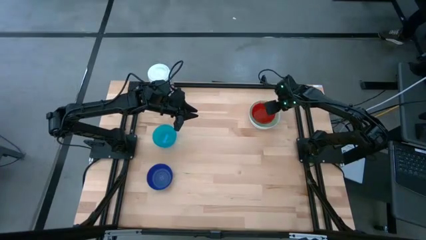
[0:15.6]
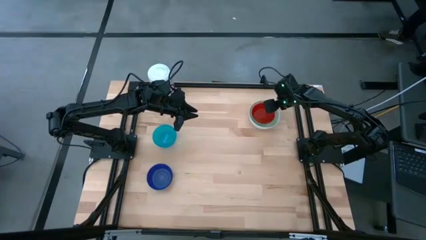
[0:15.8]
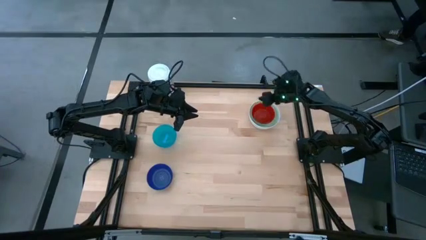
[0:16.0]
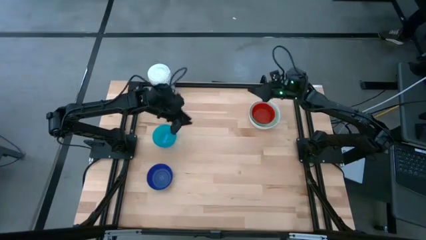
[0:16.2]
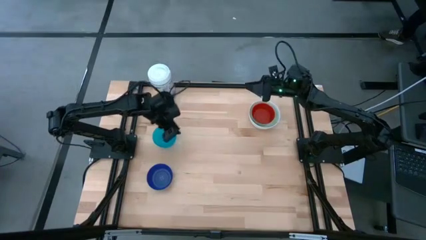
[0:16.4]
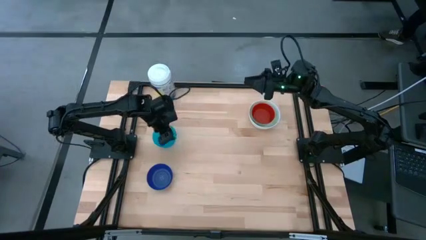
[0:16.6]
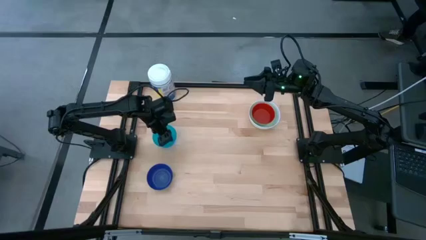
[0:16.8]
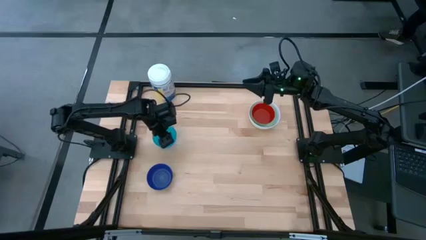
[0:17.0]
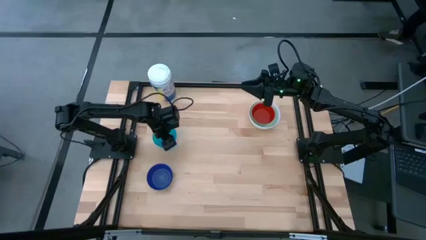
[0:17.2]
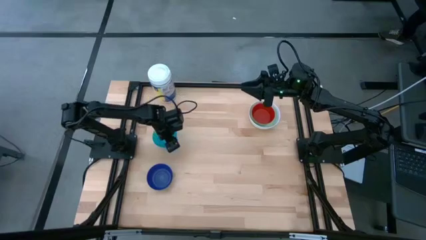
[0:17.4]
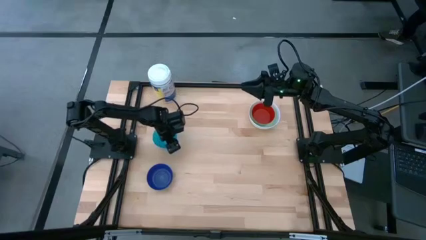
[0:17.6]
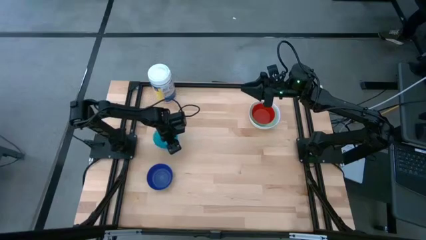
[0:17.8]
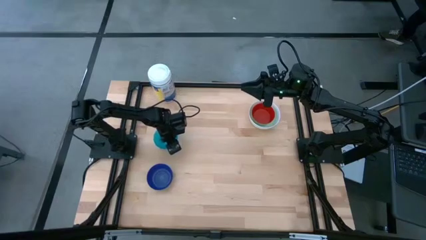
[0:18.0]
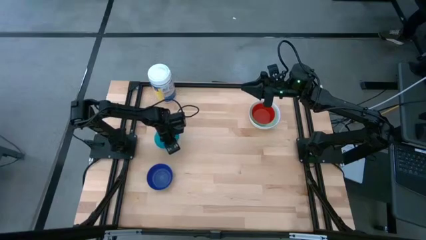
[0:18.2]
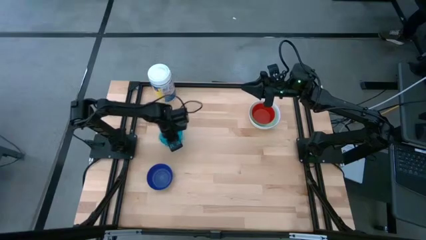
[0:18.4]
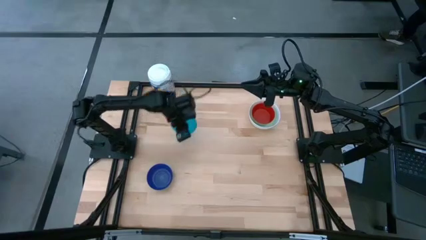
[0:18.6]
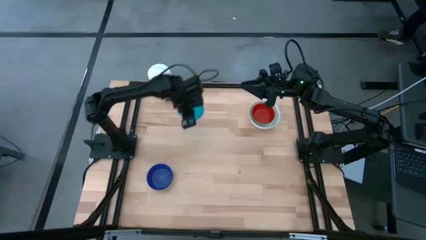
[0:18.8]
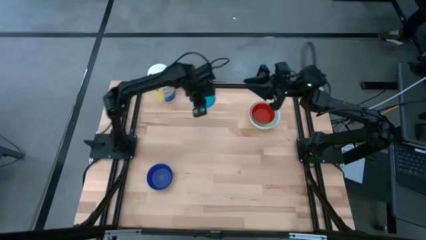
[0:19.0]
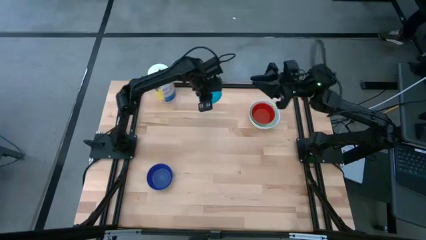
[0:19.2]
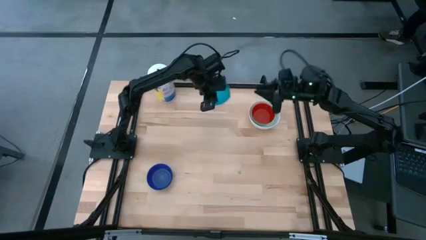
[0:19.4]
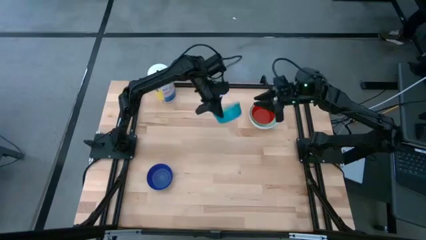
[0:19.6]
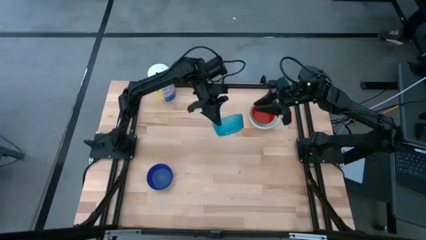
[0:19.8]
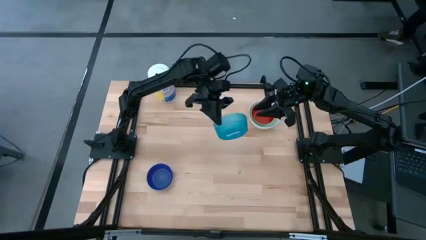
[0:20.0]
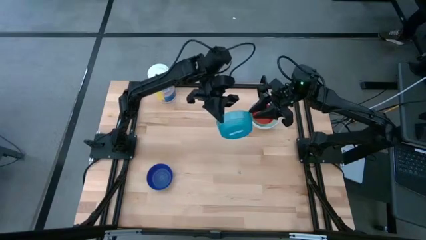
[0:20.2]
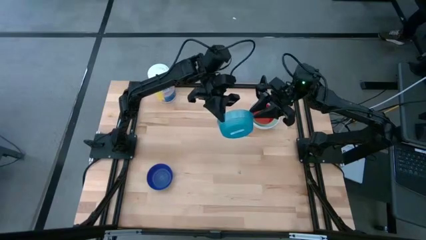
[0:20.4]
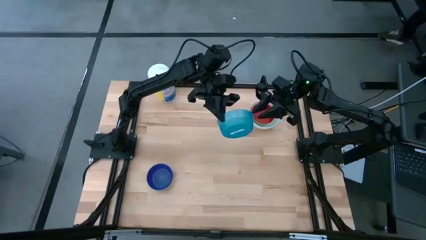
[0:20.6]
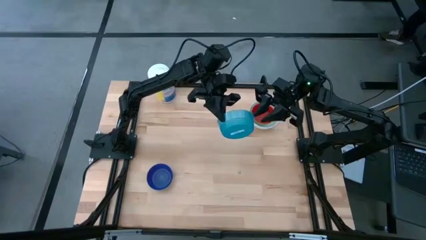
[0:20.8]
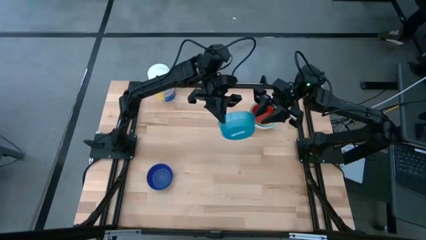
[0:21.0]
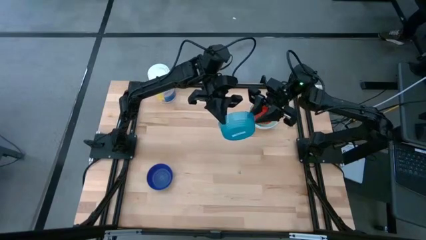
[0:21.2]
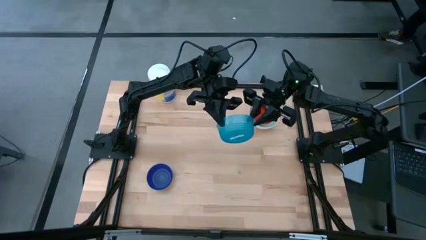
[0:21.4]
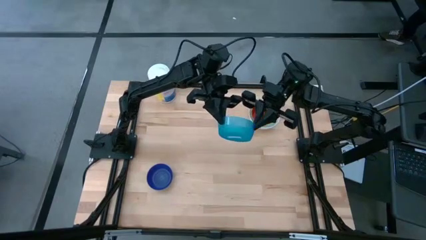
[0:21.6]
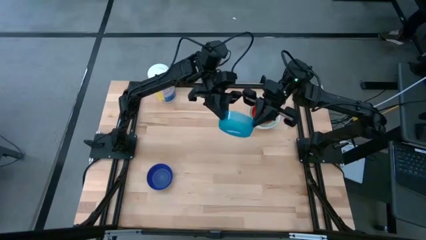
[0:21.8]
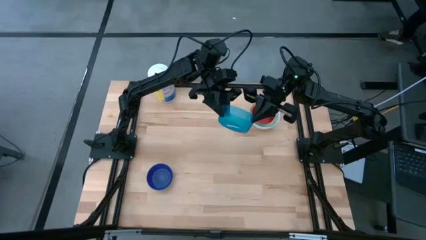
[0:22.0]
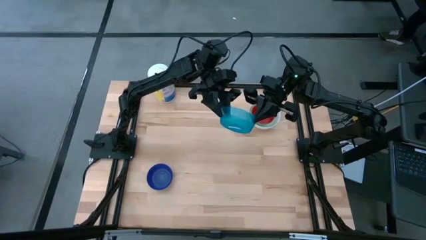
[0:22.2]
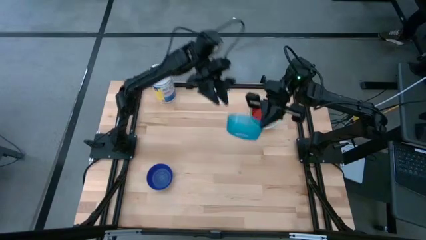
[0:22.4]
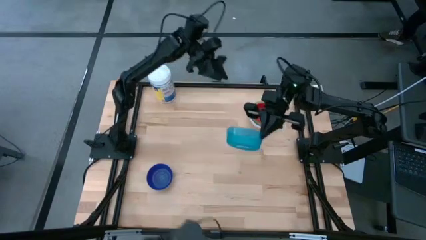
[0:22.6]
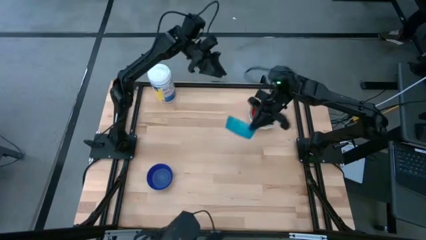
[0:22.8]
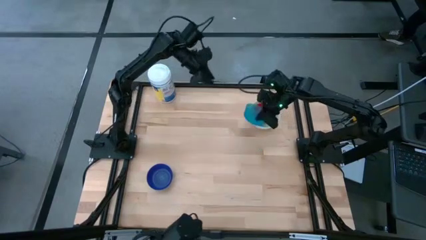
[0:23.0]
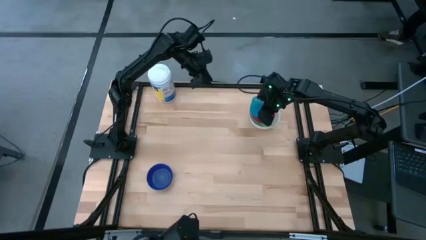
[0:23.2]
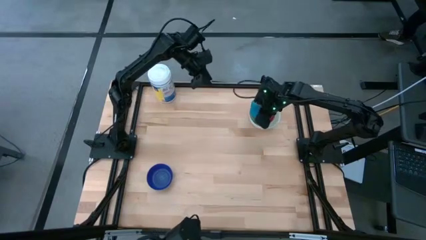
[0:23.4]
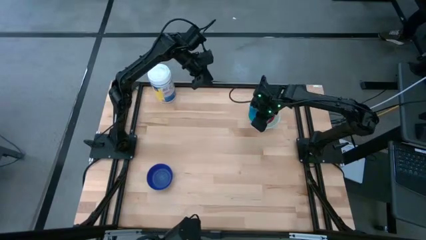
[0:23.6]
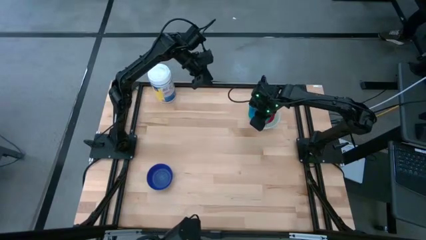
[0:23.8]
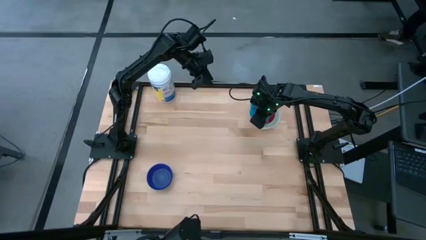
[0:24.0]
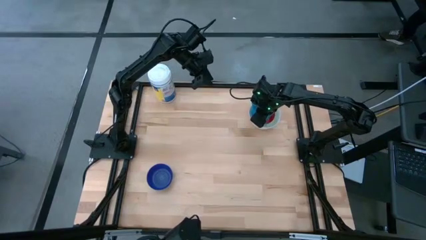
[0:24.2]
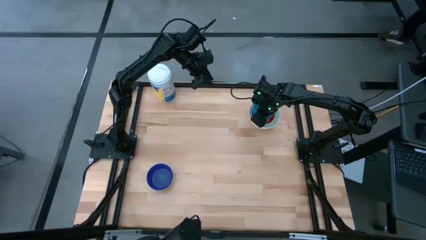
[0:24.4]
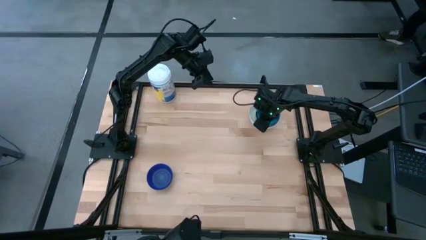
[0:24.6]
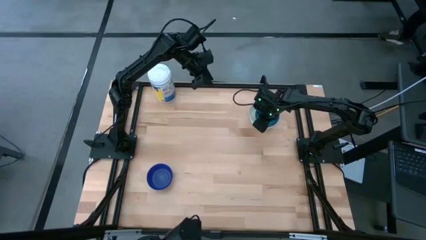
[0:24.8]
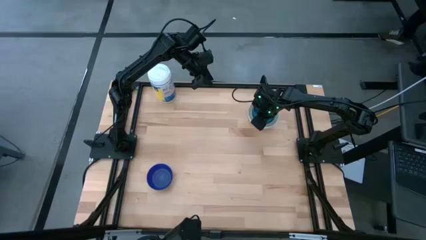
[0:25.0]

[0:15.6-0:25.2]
Stack the light blue bowl l on top of the red bowl

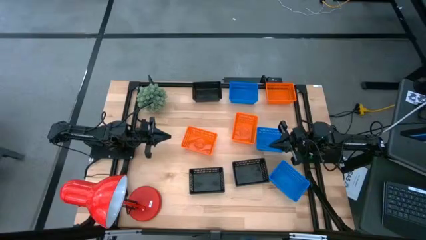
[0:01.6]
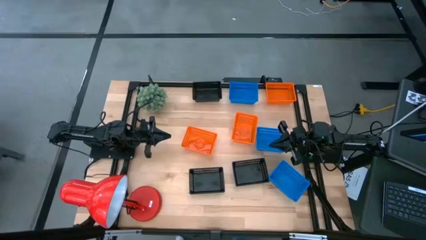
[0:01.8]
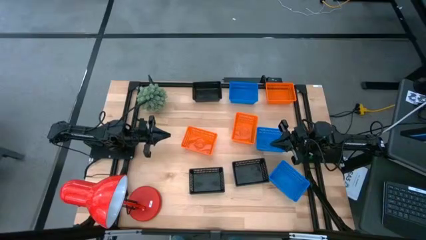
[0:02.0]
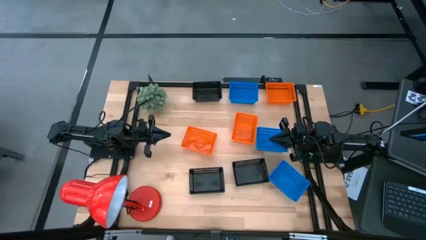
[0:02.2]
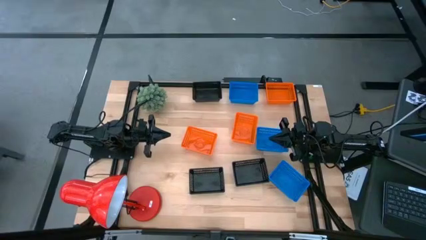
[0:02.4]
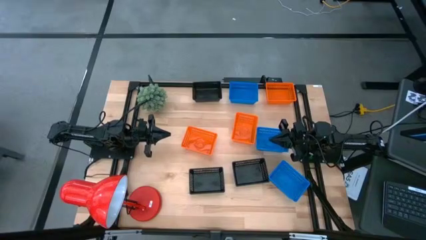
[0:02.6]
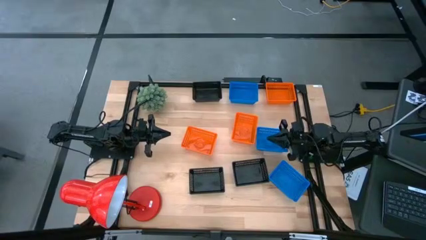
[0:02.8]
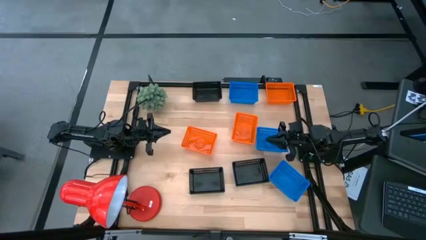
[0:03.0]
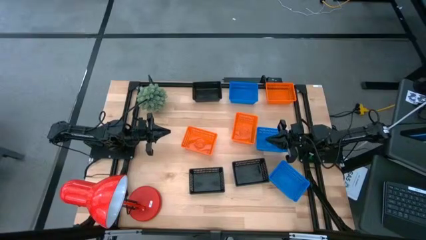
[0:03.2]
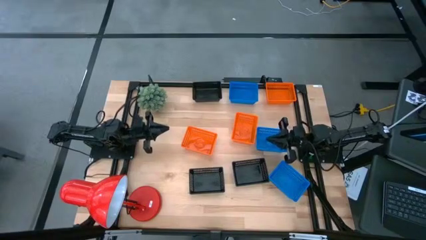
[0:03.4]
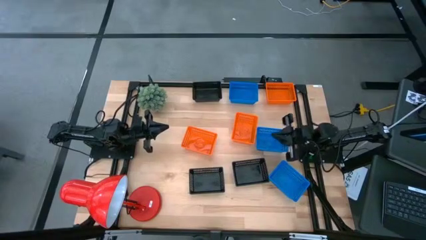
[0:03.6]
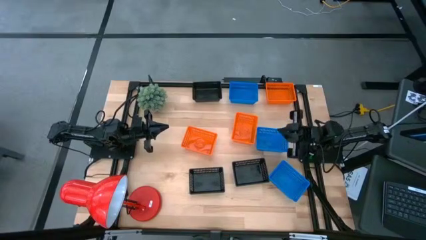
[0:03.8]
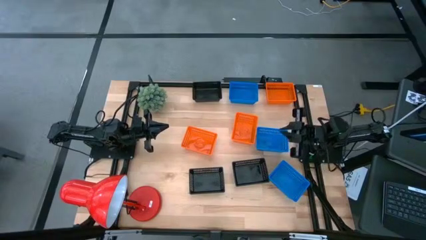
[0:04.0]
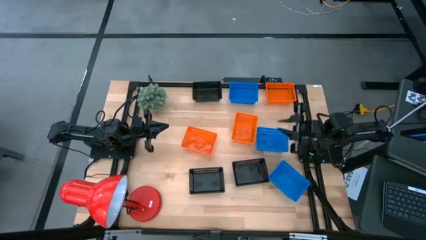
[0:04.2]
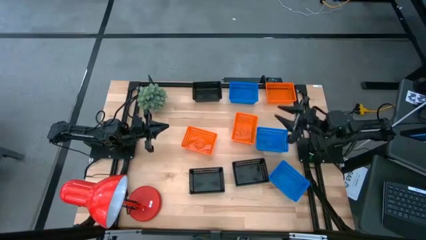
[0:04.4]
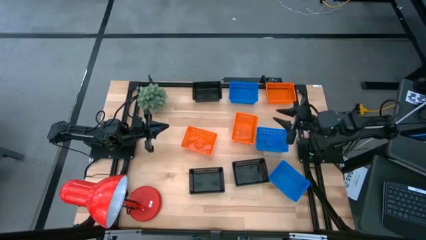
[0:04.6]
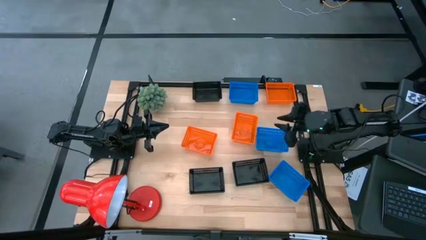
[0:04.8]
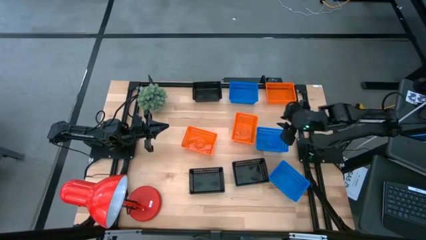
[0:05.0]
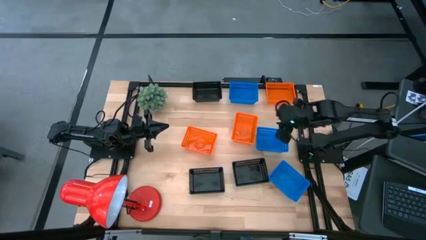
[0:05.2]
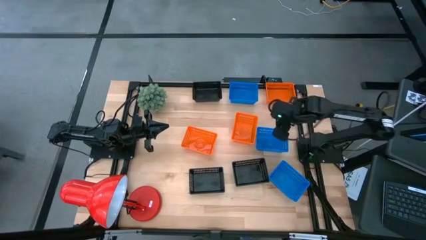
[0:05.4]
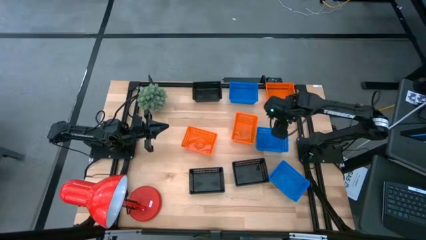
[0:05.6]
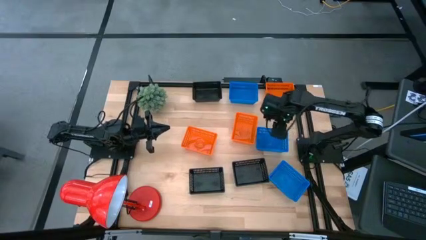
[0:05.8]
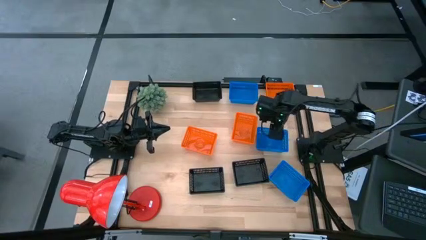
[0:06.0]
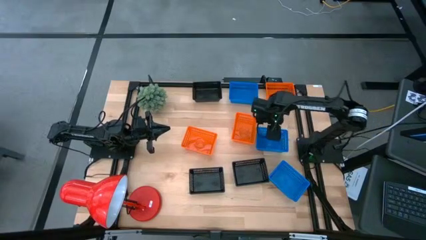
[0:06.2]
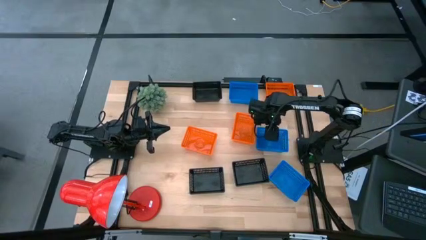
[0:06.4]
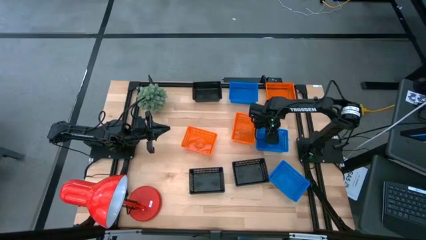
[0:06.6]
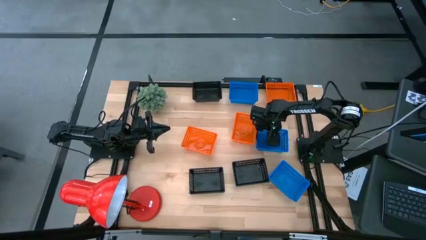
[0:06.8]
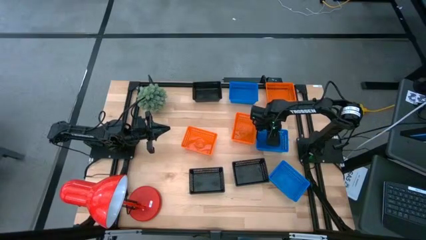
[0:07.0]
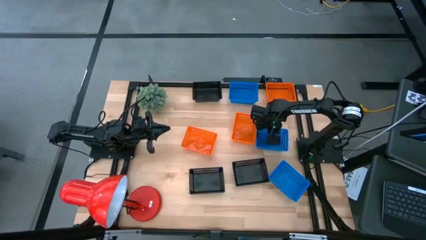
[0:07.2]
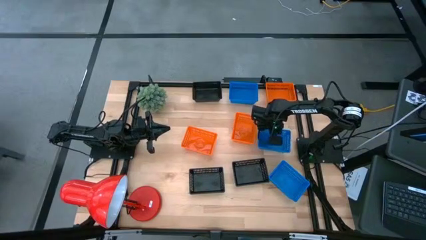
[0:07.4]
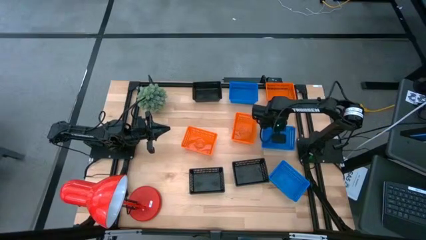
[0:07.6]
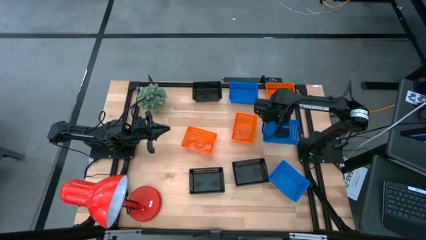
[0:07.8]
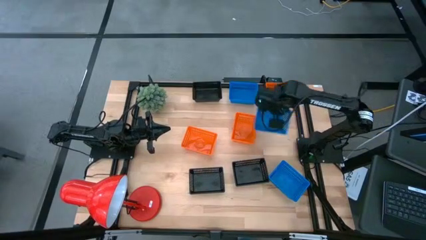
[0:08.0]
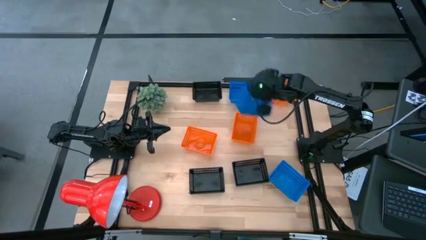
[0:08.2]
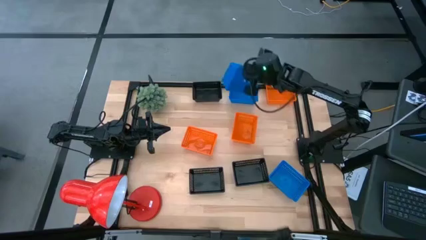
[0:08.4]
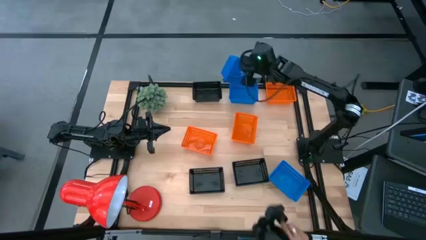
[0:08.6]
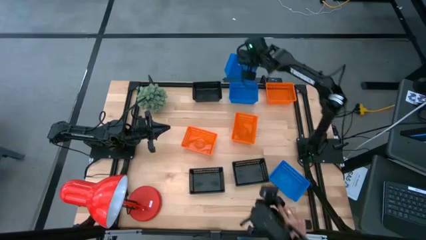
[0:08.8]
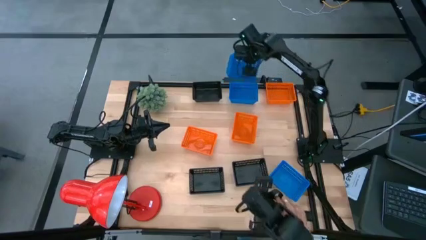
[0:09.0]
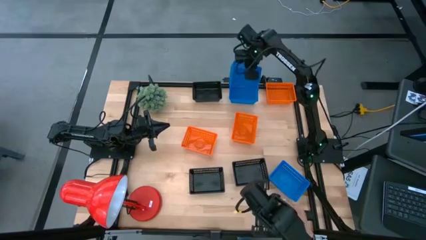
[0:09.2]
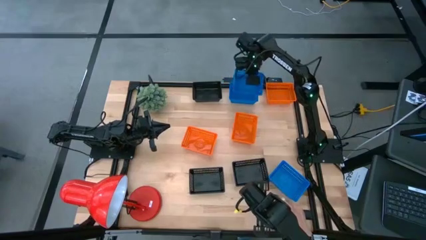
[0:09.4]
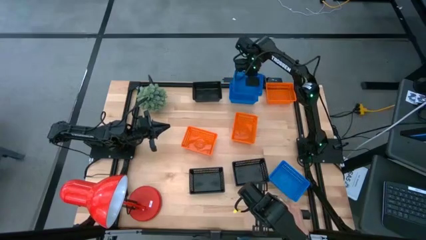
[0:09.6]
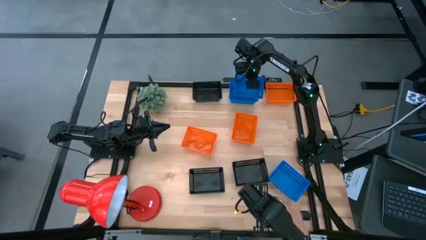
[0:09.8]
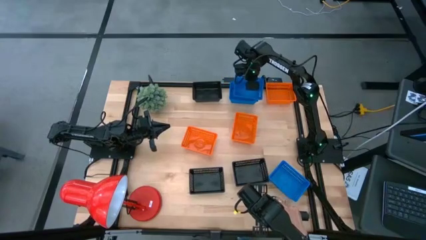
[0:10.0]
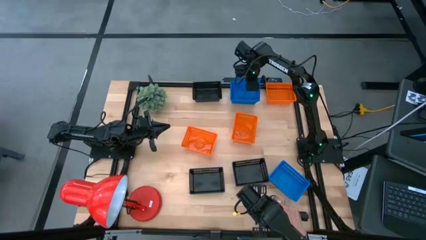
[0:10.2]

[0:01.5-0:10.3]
Stack the middle blue bin on the top blue bin
